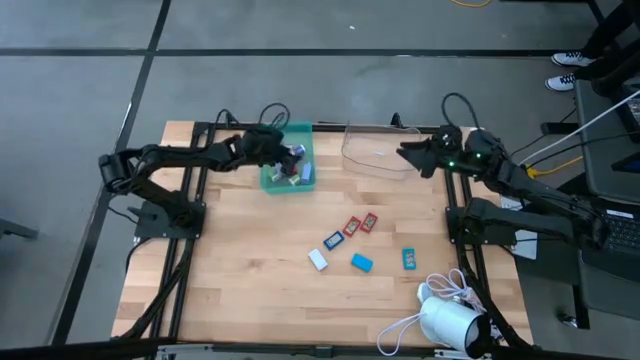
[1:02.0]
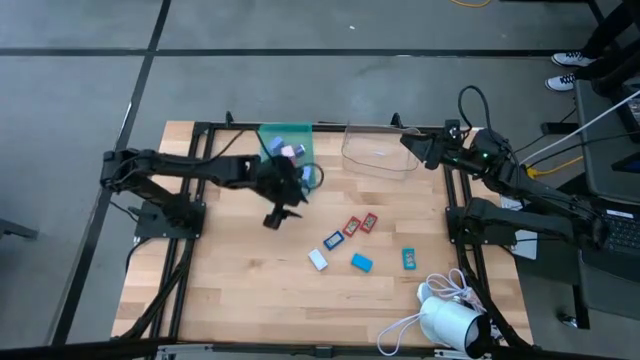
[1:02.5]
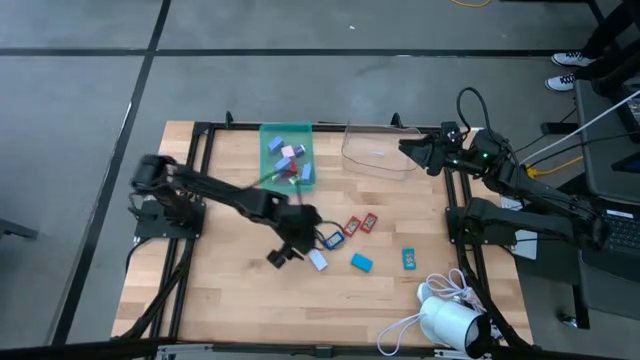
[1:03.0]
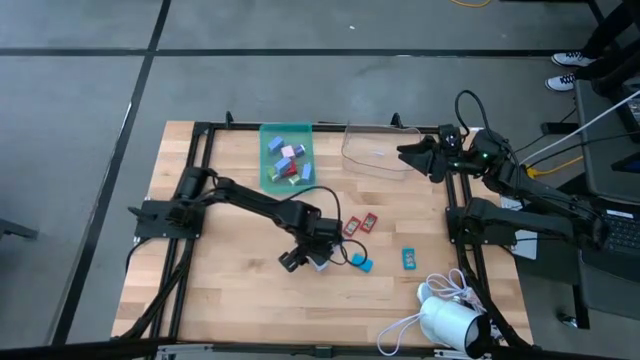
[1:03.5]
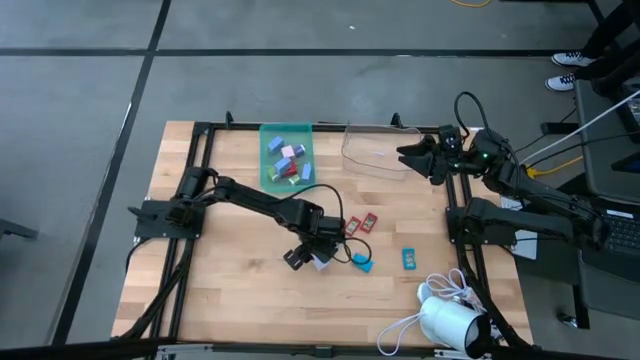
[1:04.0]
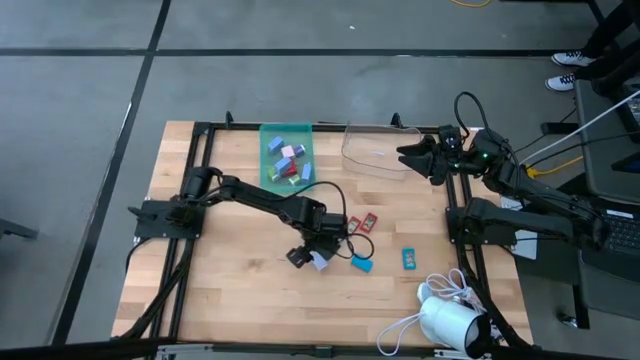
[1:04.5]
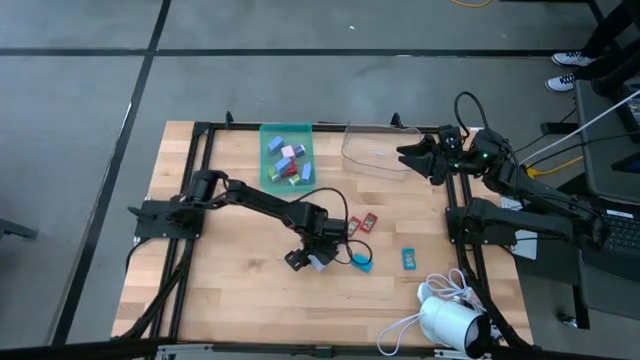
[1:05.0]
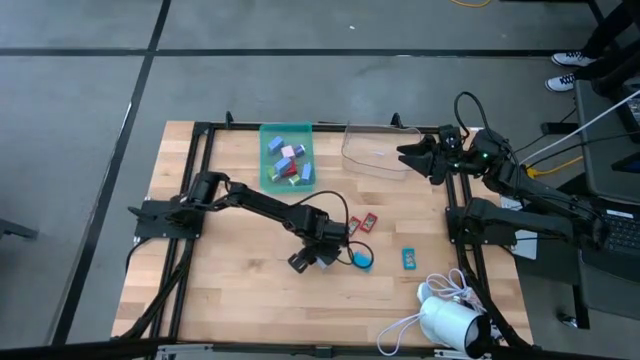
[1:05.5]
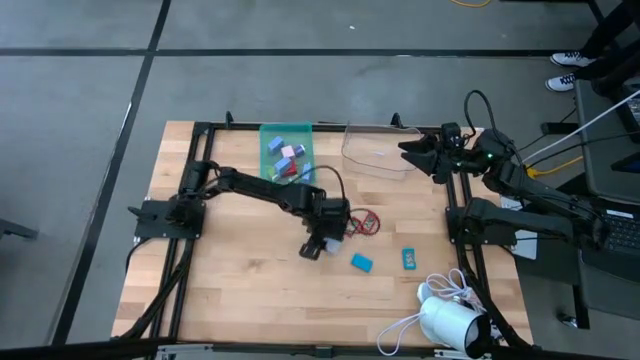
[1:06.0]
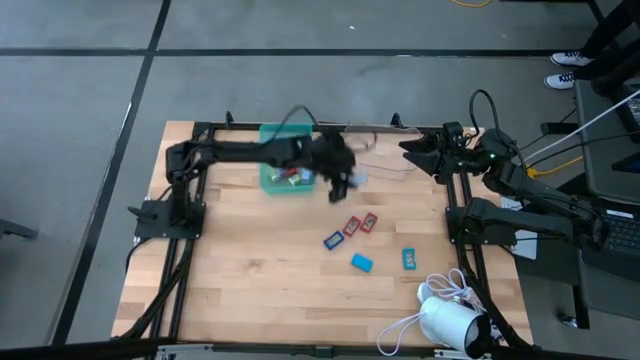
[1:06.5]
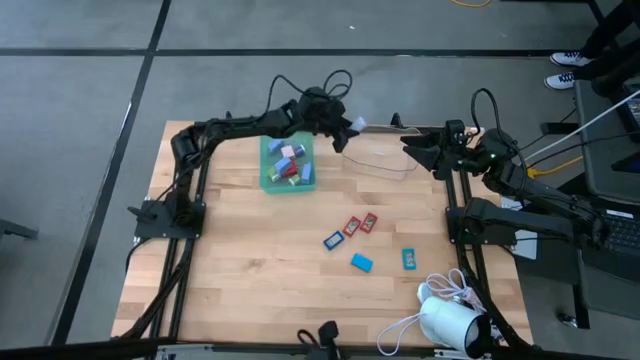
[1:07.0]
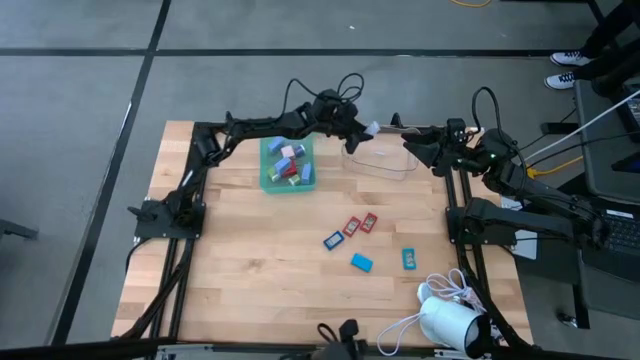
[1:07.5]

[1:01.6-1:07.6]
Task: Pick & Place Office items
Put the white digital clock into the transparent bin

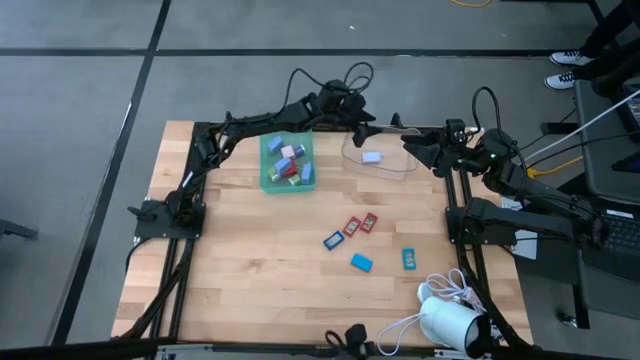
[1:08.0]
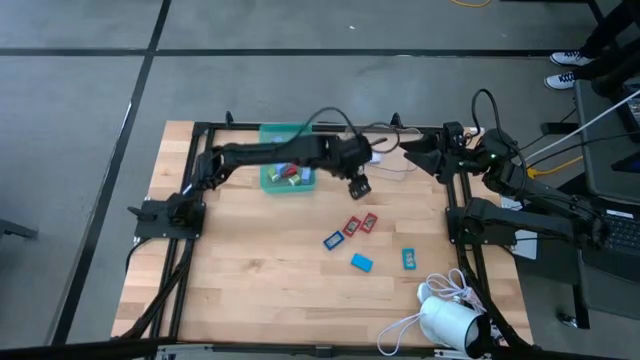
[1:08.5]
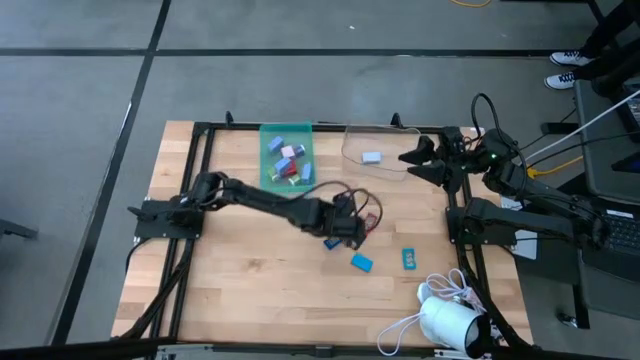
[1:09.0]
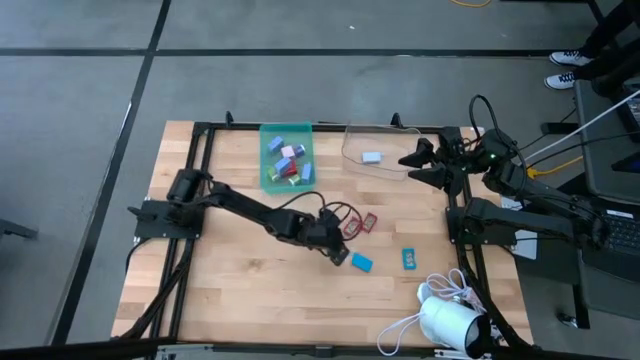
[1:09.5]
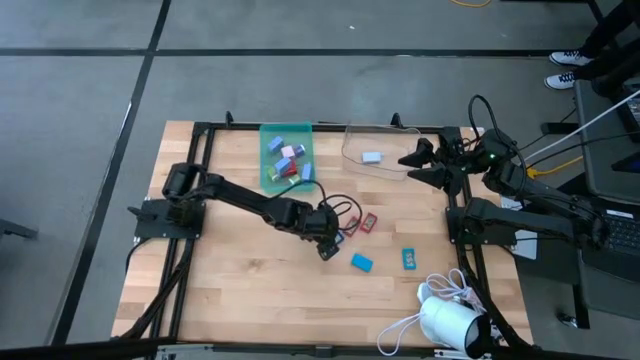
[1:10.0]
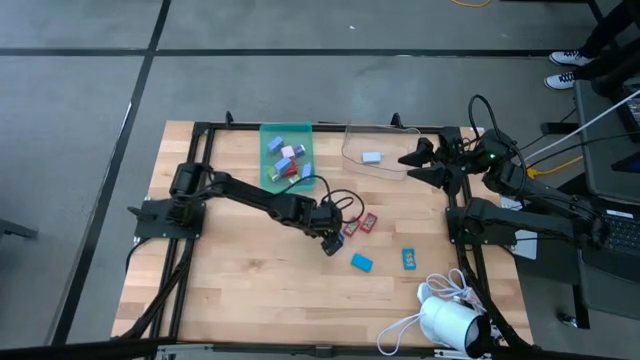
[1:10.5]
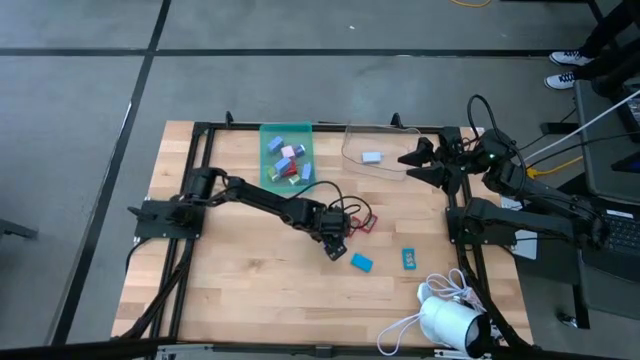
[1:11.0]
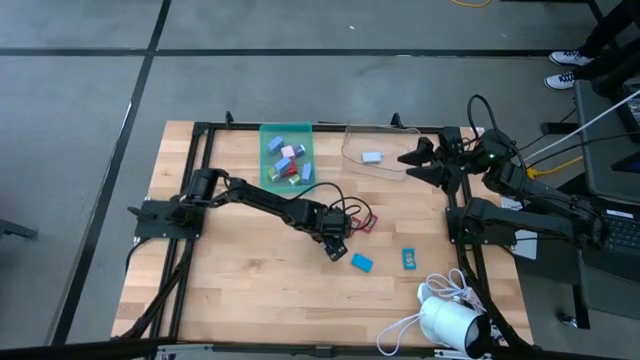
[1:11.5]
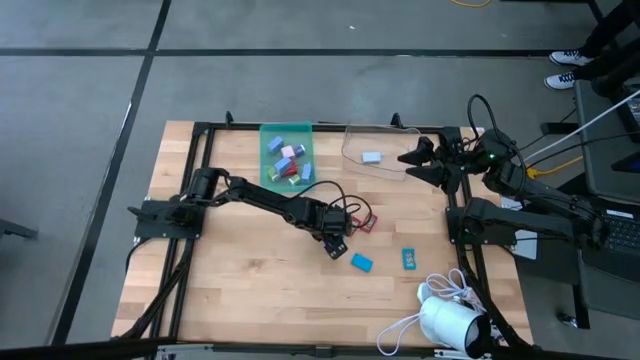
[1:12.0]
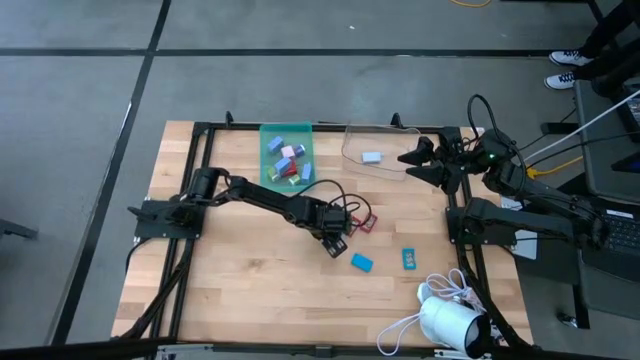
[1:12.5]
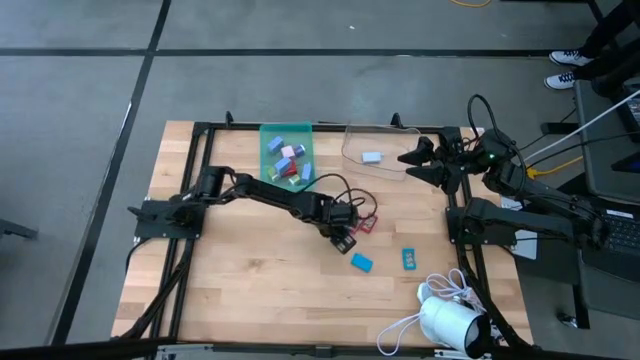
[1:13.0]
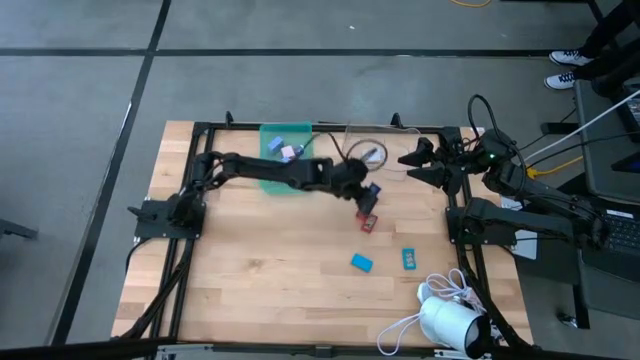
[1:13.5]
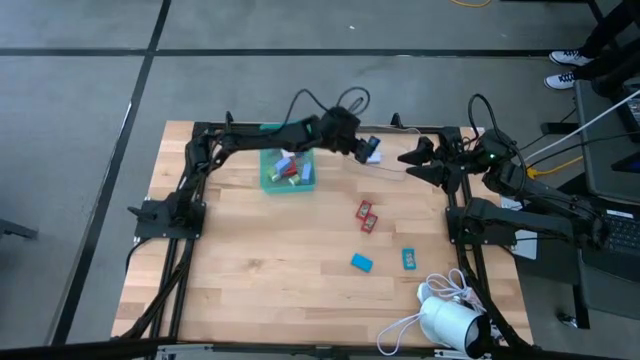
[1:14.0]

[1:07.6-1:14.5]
Put the dark blue digital clock into the transparent bin

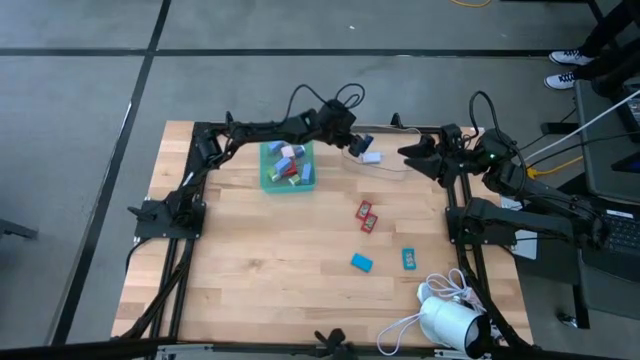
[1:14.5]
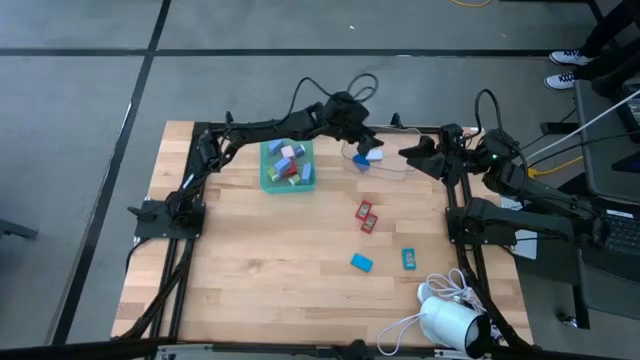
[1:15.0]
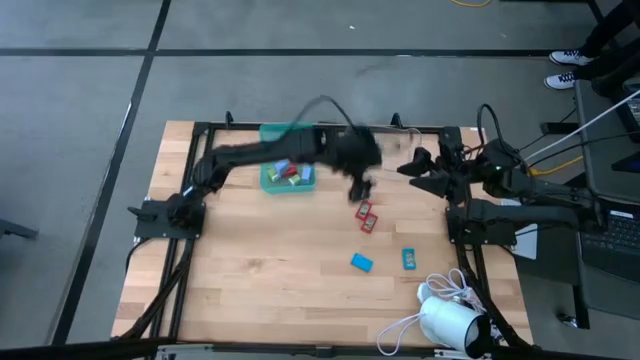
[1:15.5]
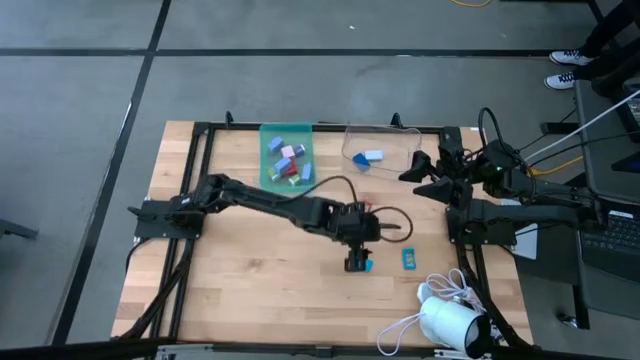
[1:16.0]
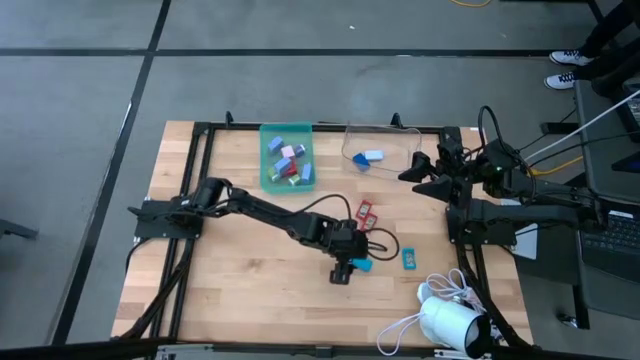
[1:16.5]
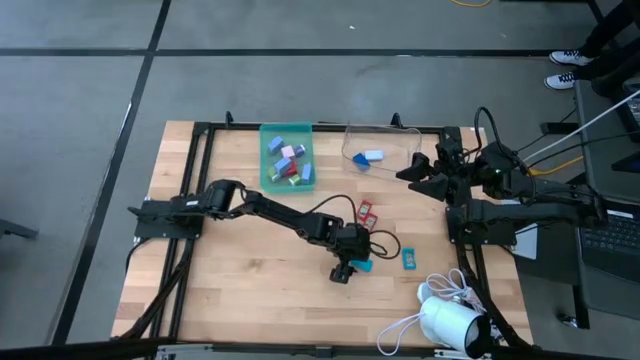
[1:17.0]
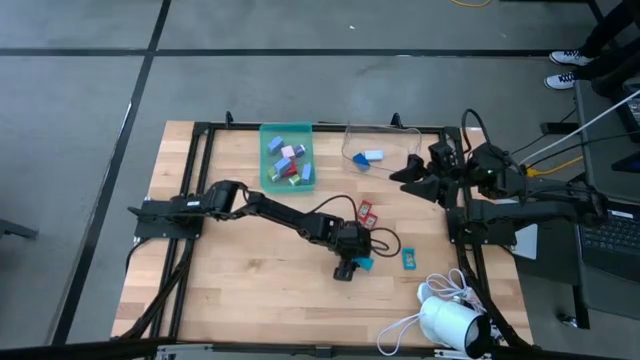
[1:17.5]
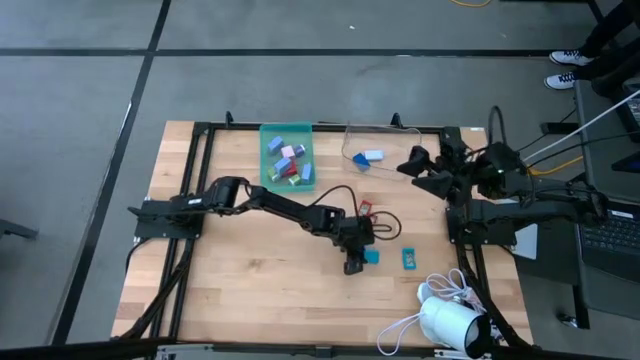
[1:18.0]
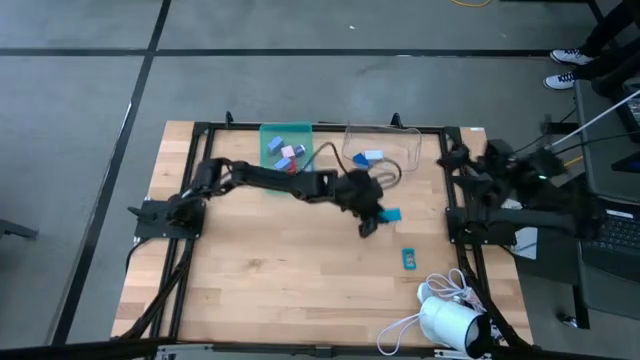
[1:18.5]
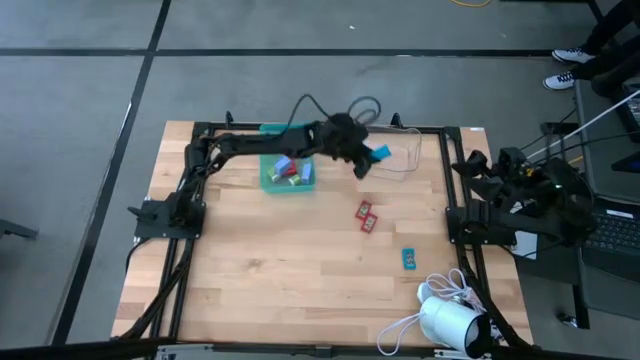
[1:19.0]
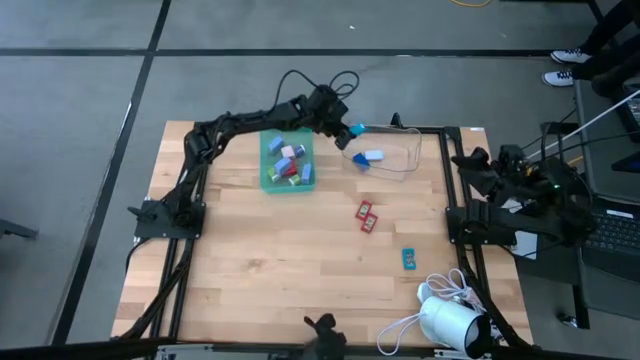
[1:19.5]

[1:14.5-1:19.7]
Put the left light blue digital clock into the transparent bin

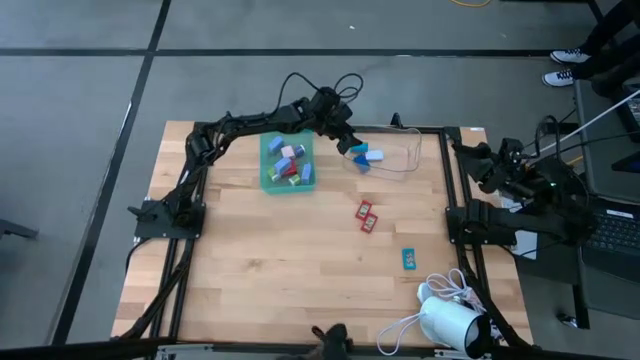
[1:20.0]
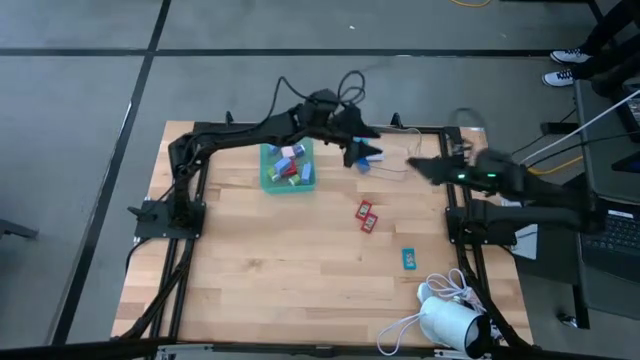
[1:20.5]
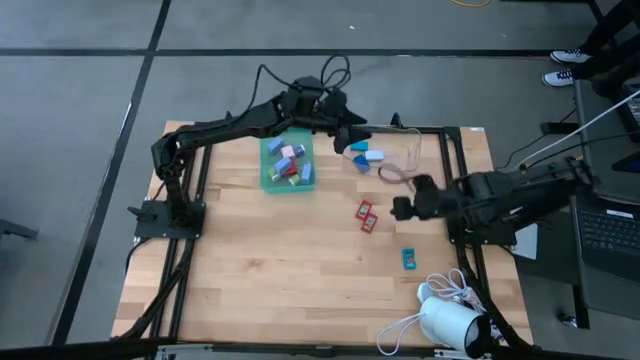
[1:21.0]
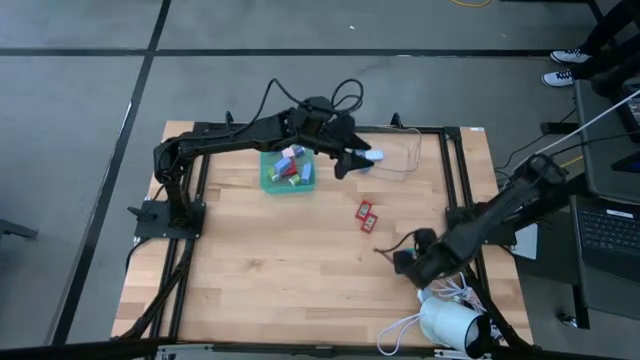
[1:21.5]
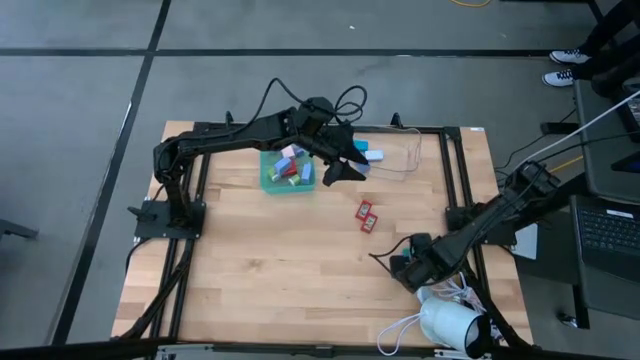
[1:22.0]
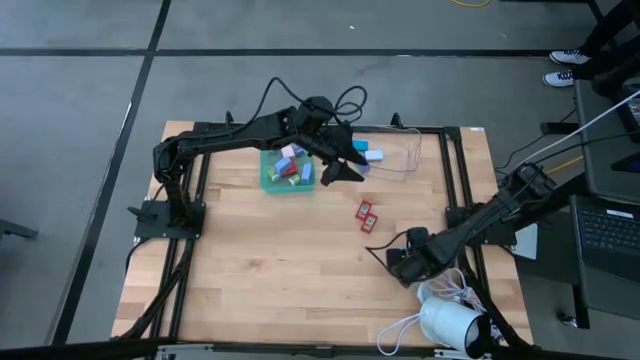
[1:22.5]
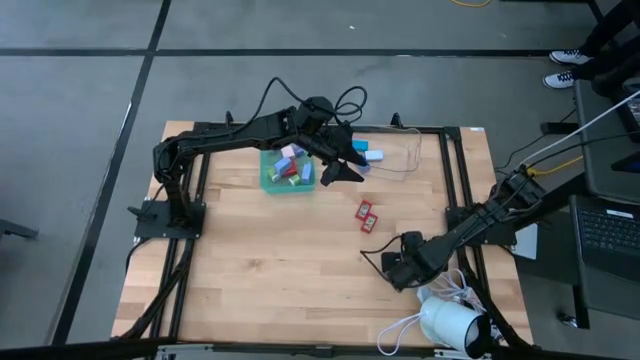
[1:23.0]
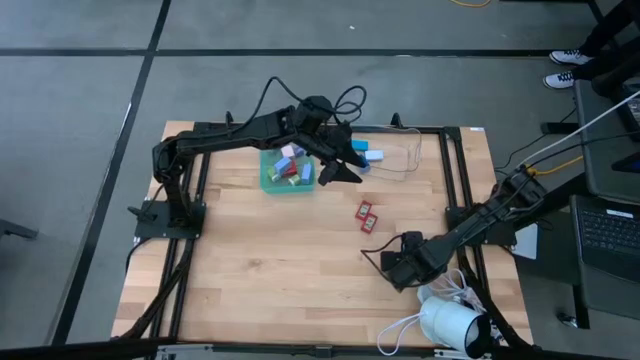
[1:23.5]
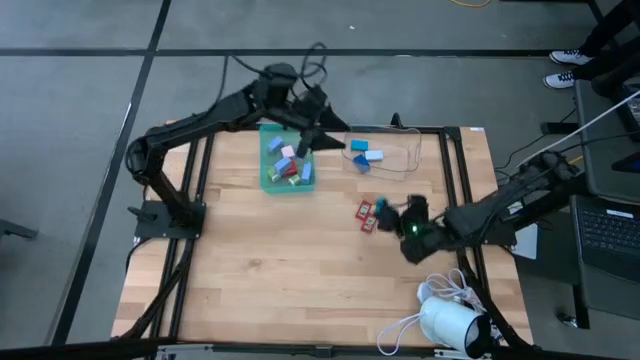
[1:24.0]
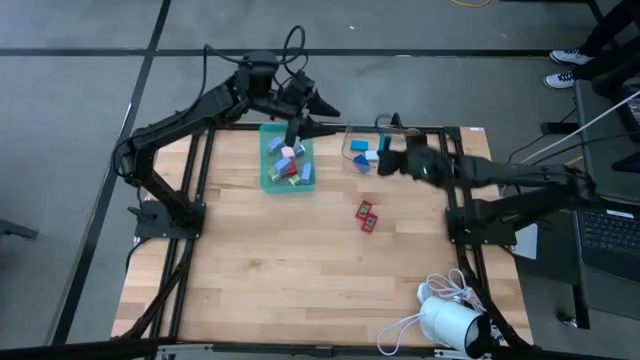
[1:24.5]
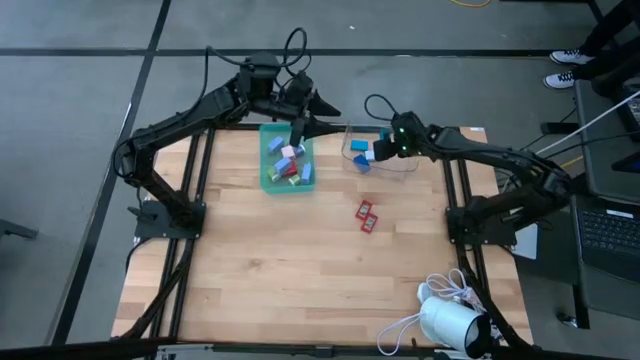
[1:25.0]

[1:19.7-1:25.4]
Put the light blue digital clock into the transparent bin
